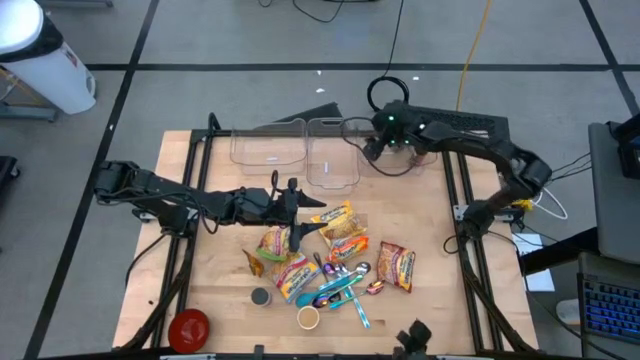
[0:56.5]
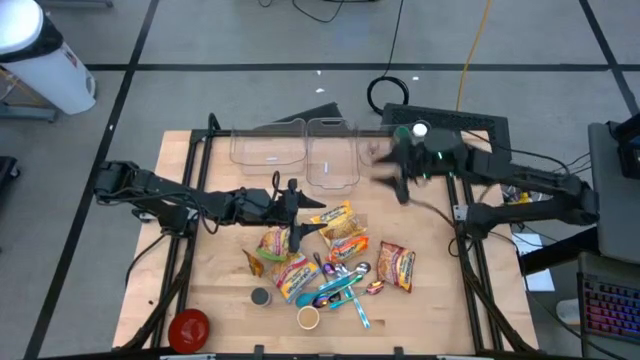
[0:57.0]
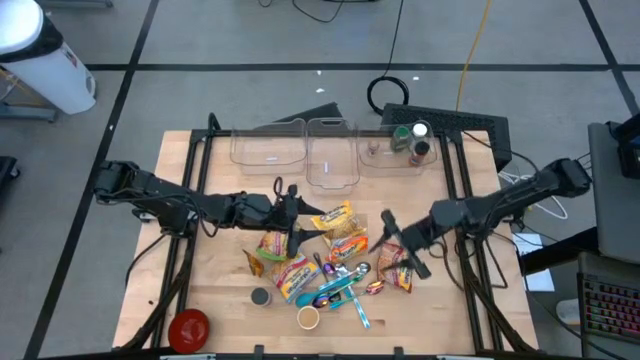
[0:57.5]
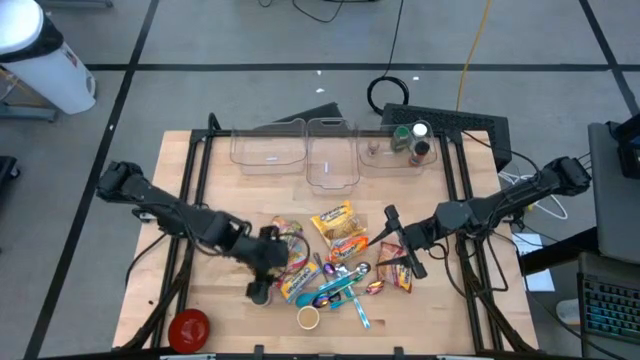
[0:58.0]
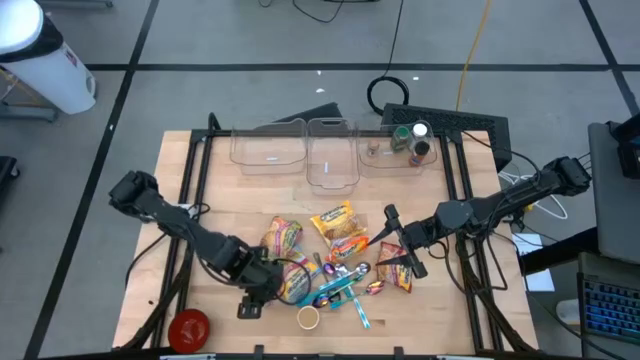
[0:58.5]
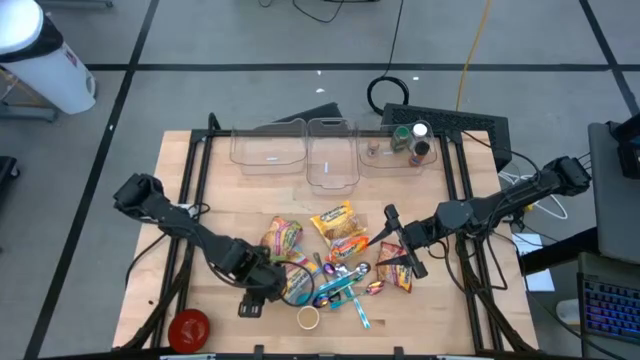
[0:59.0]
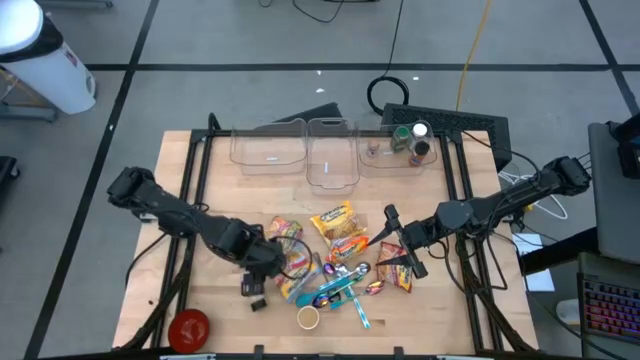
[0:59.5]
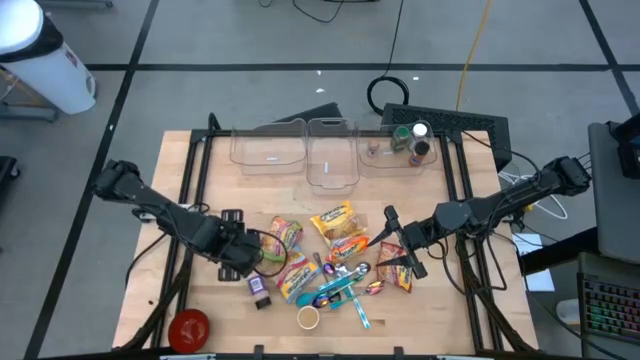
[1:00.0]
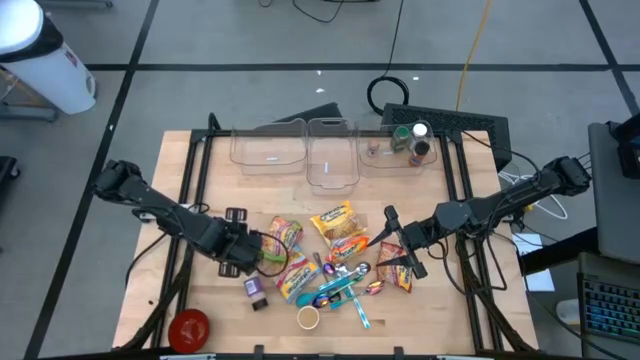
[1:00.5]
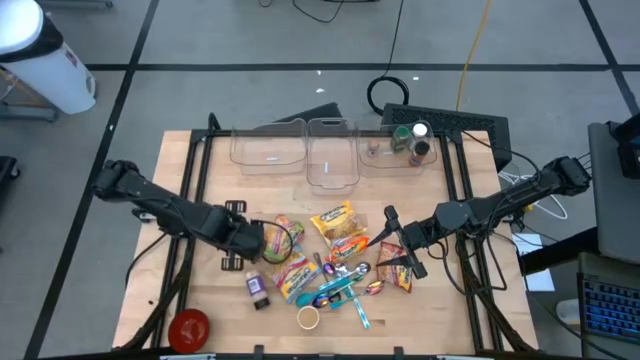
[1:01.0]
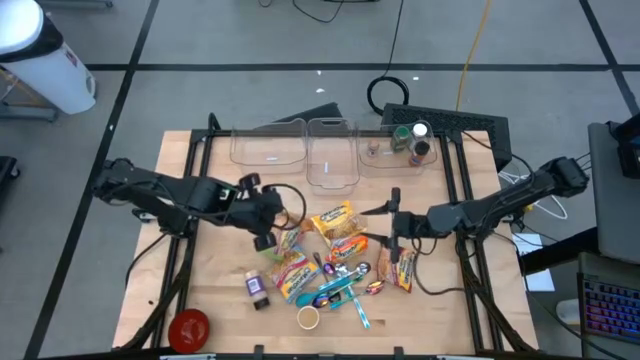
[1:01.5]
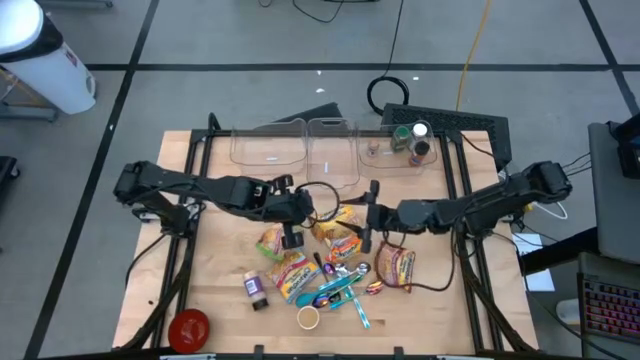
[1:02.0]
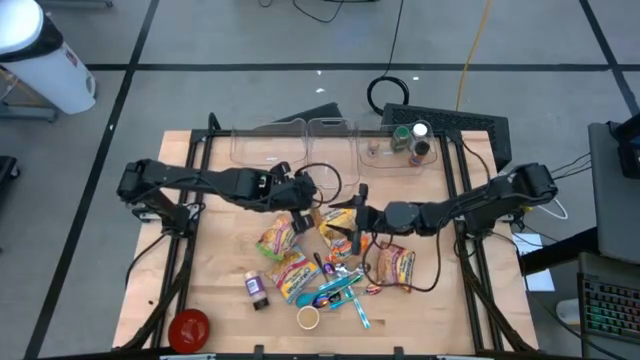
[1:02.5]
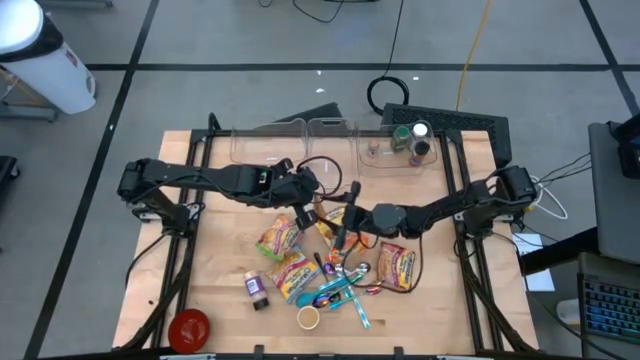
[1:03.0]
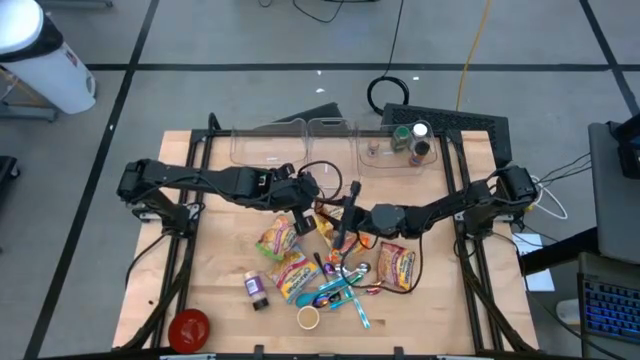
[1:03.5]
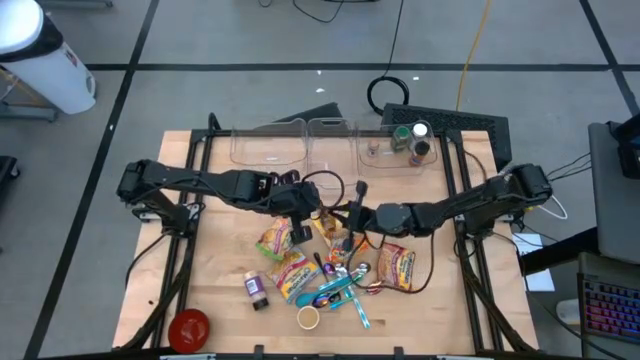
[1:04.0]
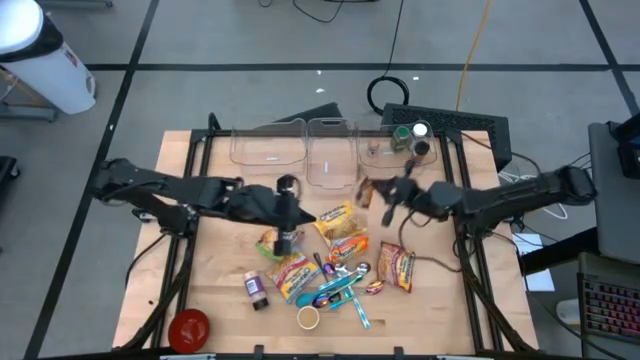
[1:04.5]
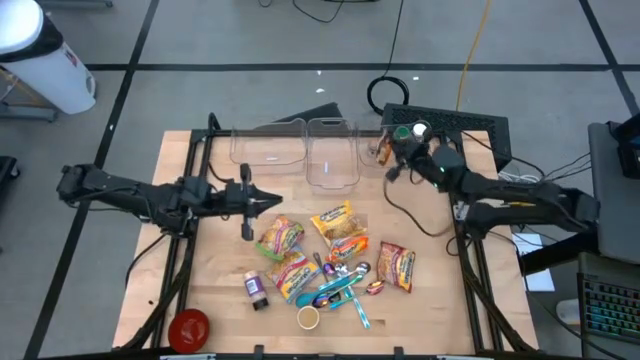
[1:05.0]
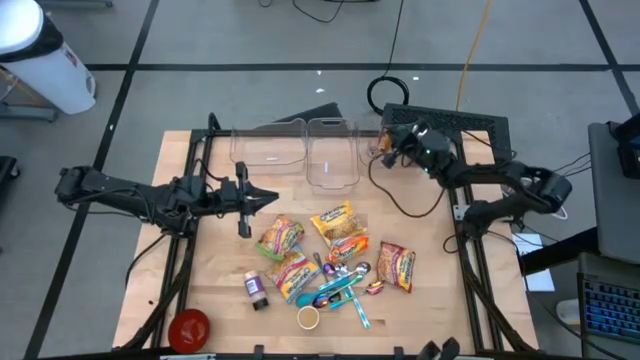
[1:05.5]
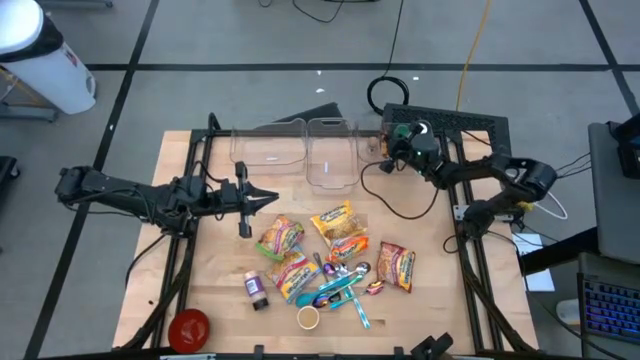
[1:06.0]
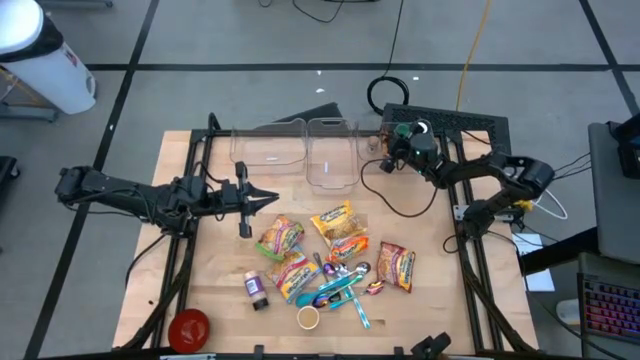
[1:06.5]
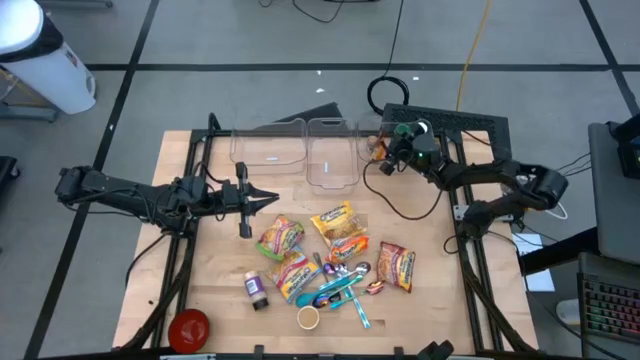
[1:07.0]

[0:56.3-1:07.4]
Task: Pick & Place Food Item
Put the orange seasoning pack into the right transparent bin

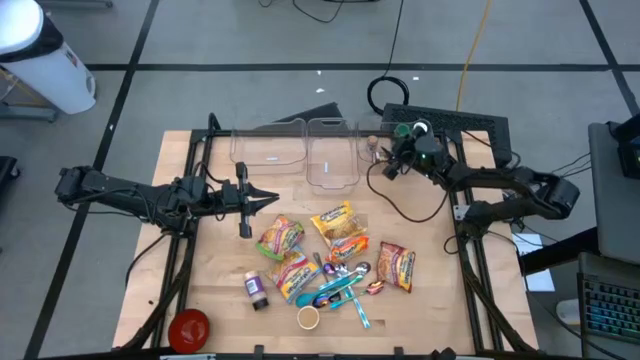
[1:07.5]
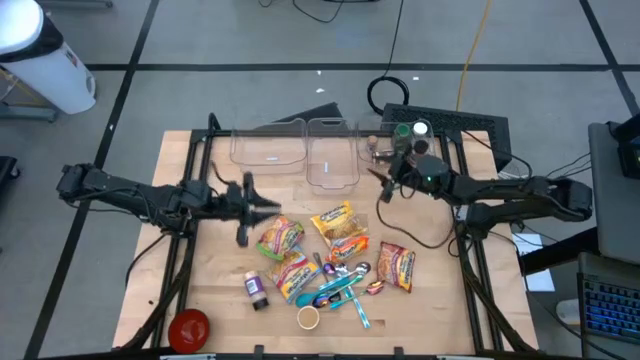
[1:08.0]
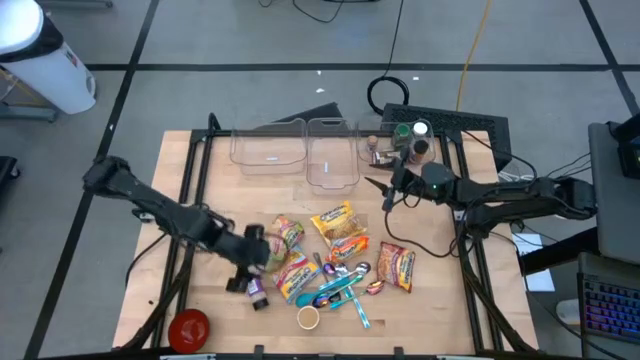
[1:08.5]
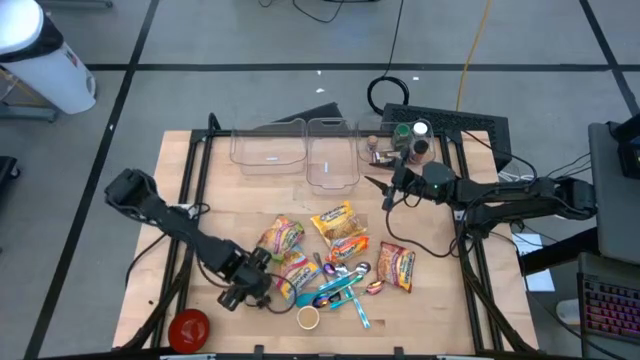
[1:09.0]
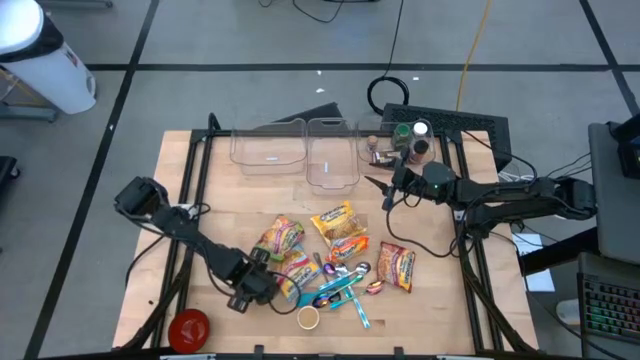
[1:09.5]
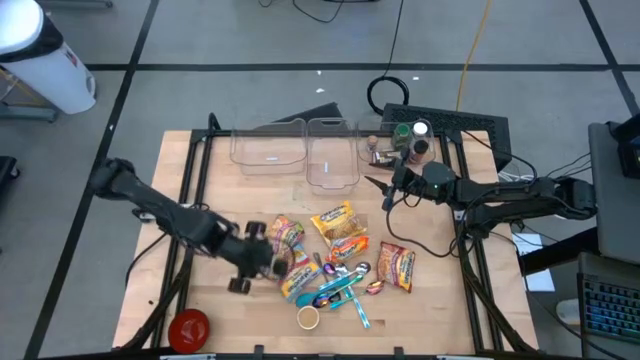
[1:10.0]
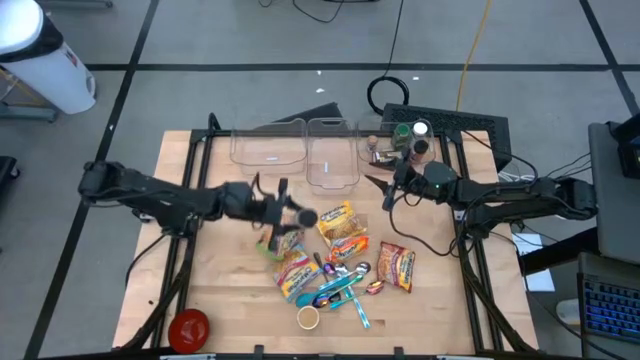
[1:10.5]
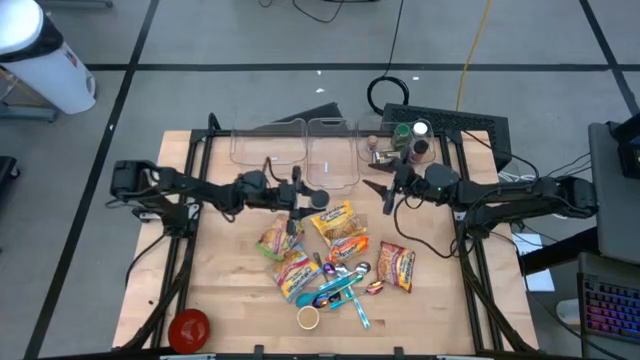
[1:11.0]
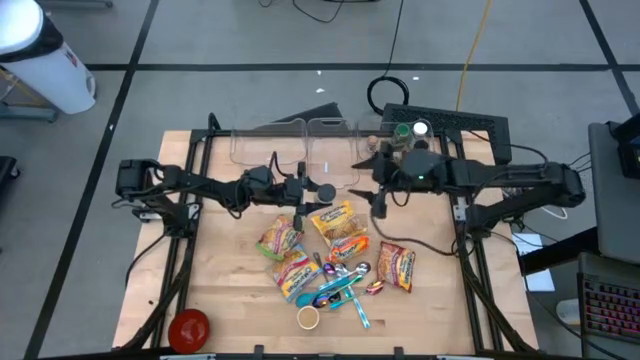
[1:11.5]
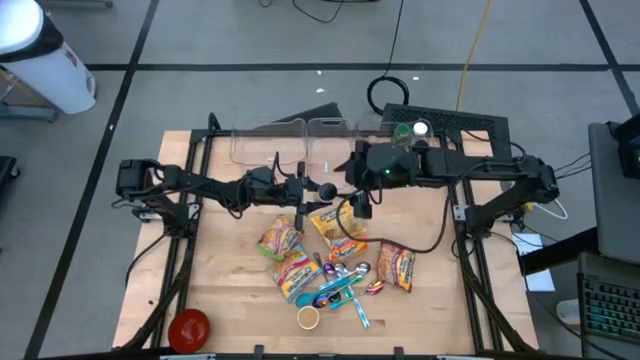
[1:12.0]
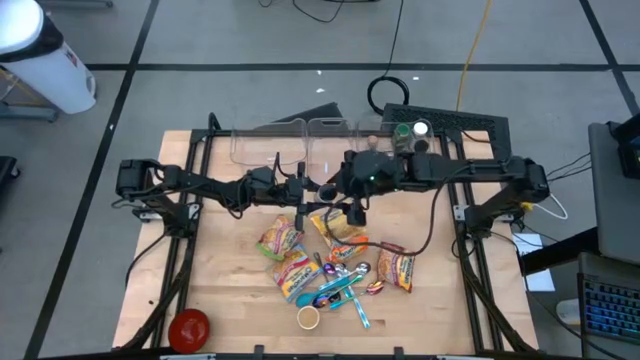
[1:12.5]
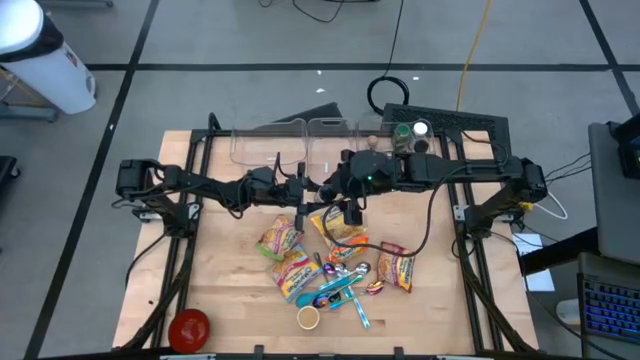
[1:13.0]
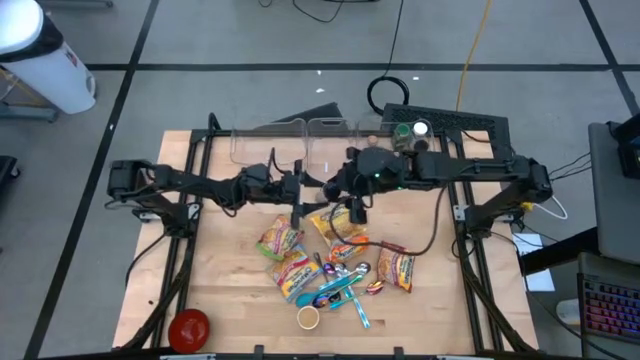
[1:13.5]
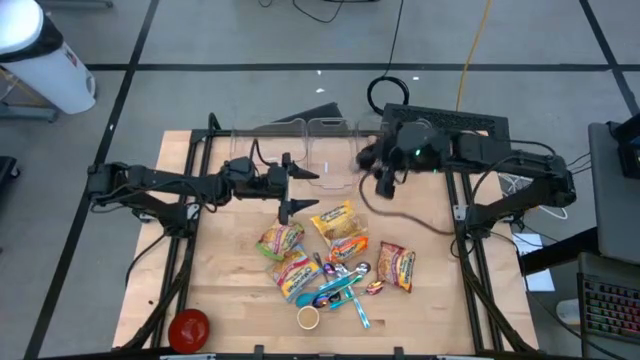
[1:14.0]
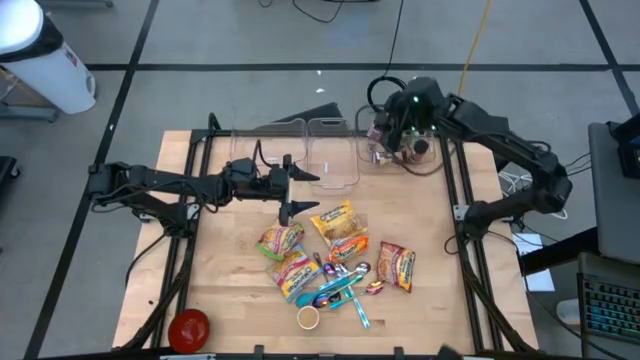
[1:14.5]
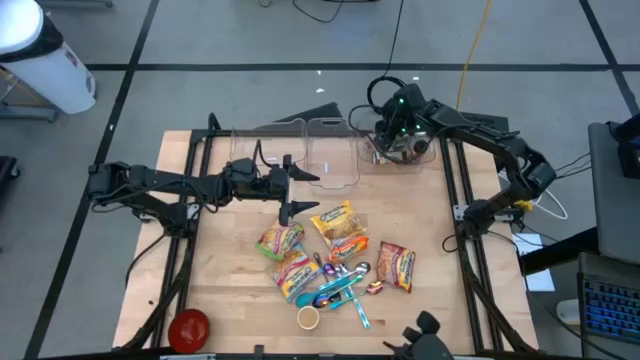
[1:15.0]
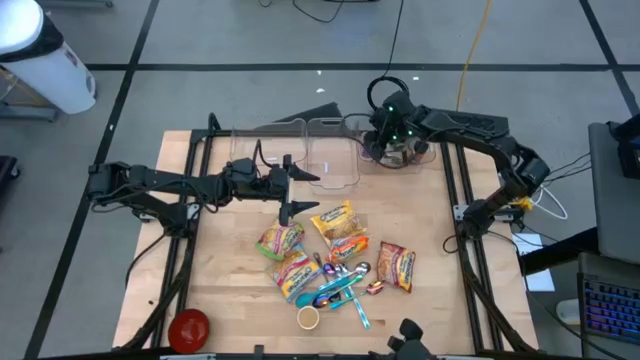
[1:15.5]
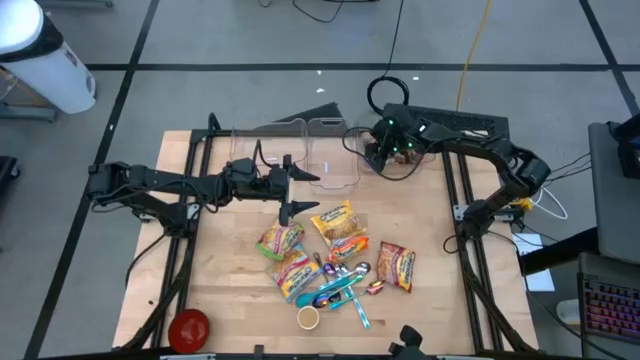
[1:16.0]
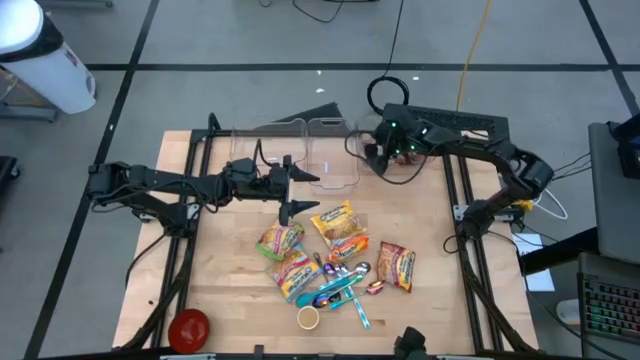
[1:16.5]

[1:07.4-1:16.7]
Put the purple seasoning bottle into the right transparent bin
